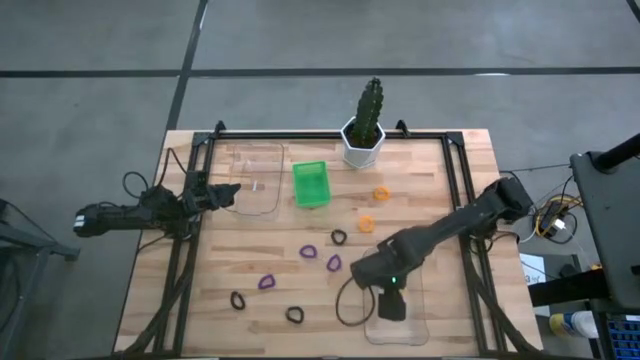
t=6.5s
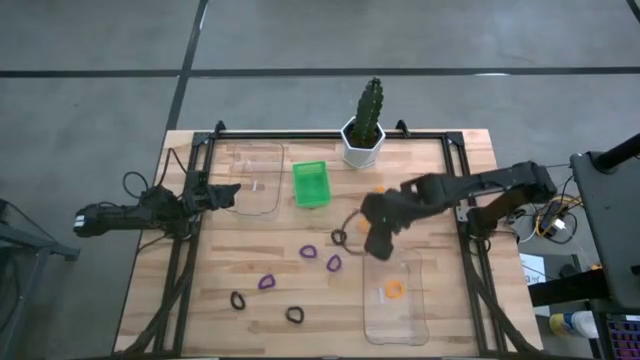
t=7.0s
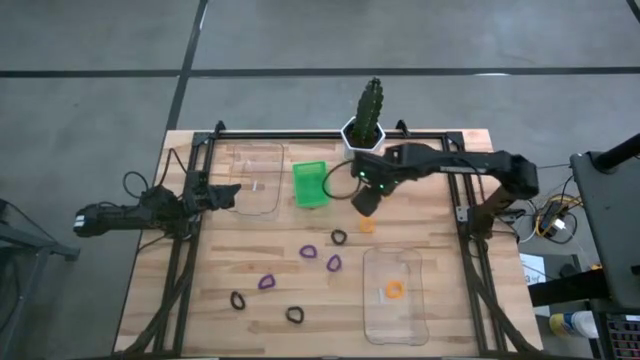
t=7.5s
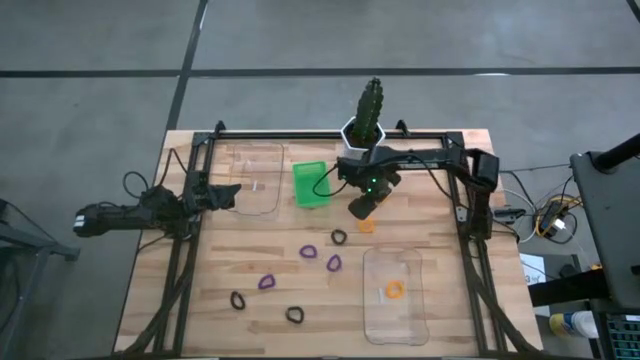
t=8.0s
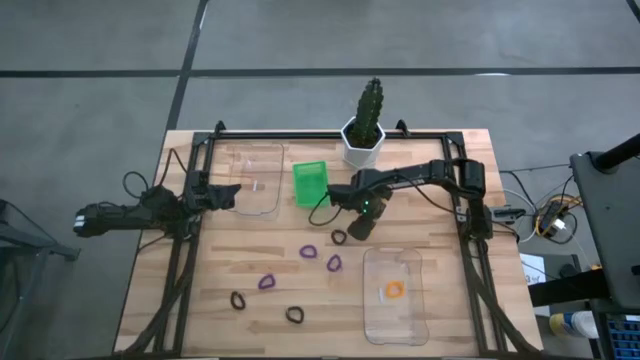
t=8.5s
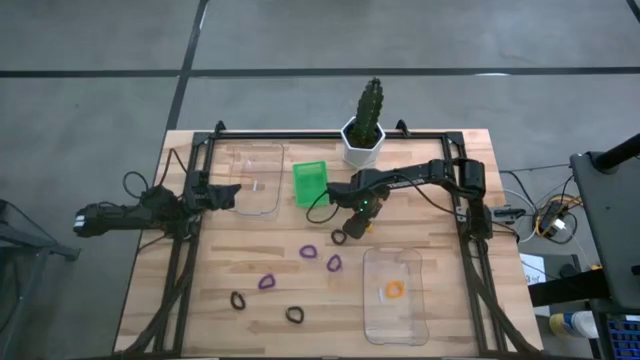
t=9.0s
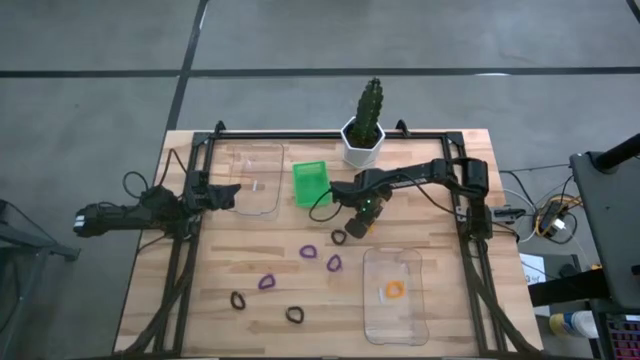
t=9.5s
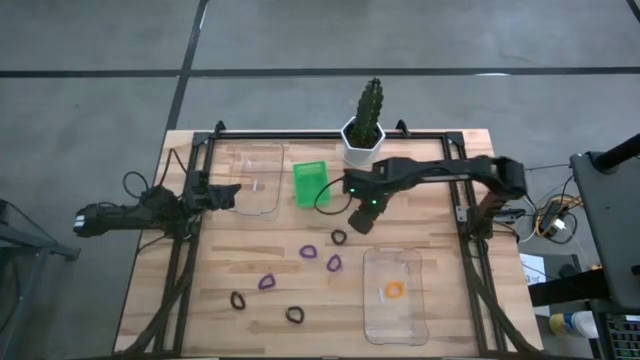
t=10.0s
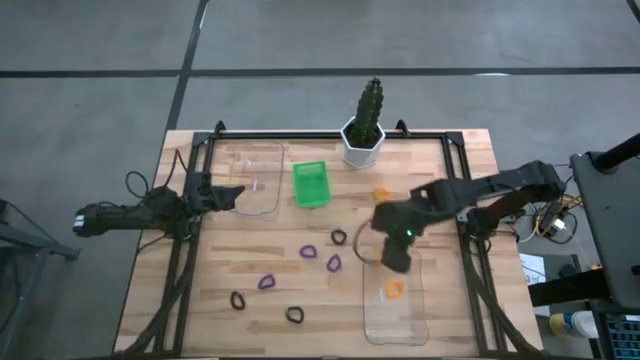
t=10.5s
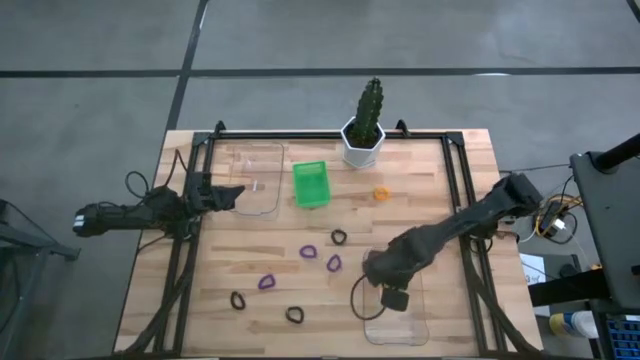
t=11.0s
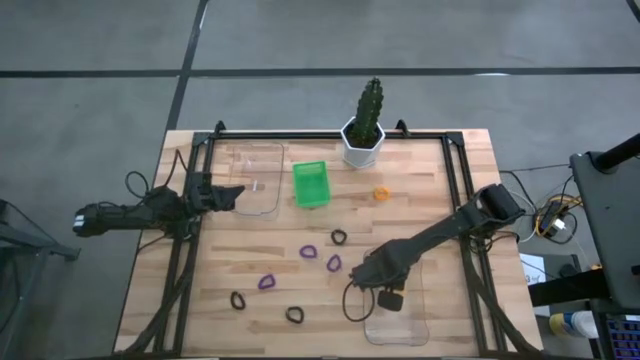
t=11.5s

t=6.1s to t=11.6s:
Task: Sort spring keychains
Put the bottom yellow spring keychain into the bottom transparent bin

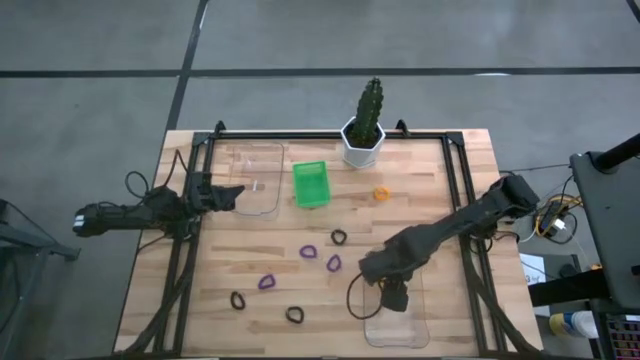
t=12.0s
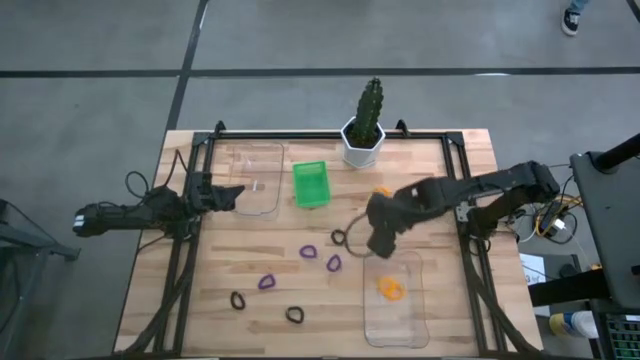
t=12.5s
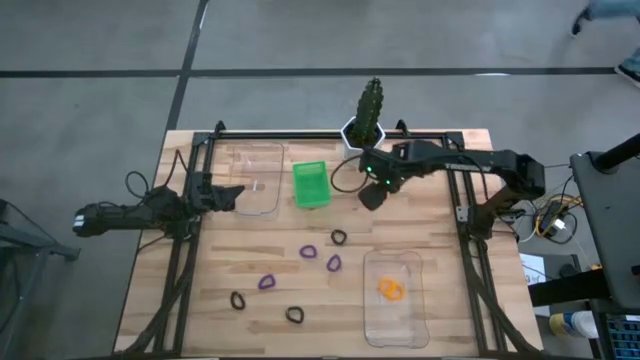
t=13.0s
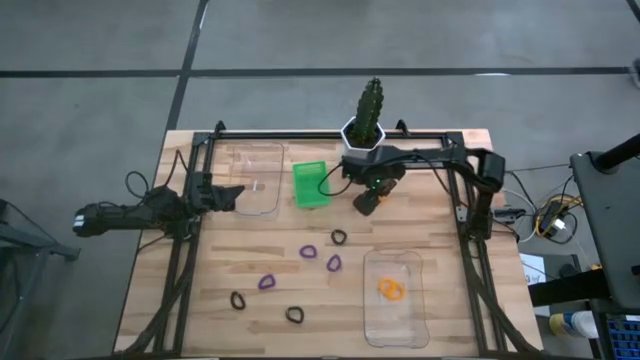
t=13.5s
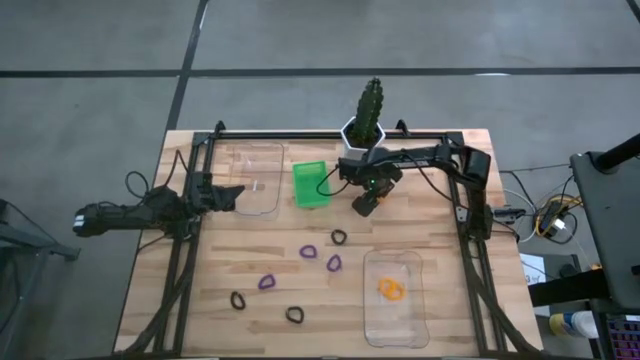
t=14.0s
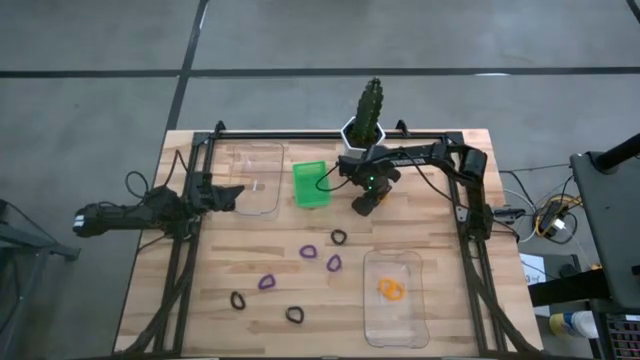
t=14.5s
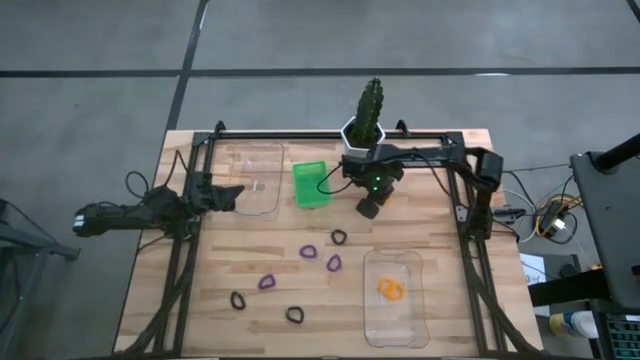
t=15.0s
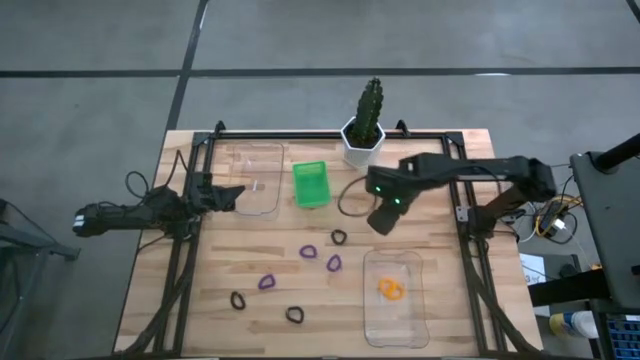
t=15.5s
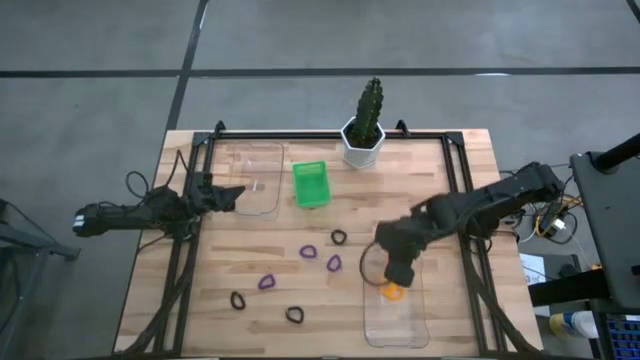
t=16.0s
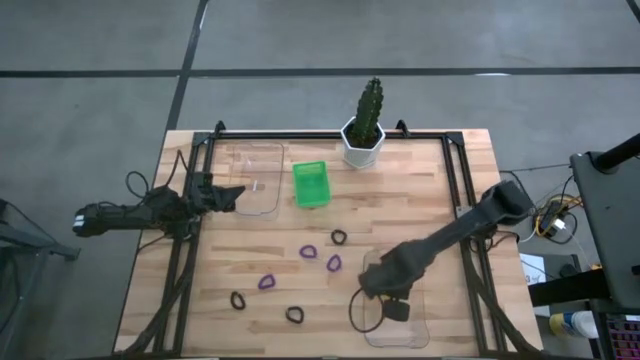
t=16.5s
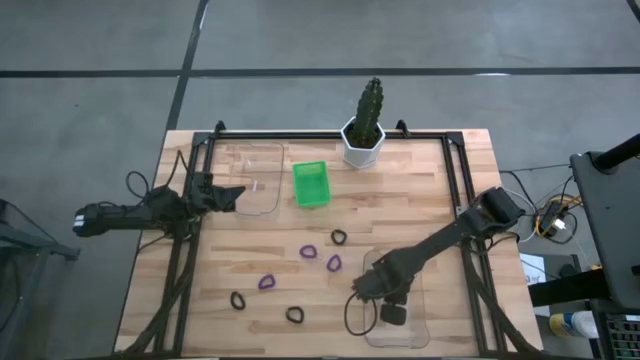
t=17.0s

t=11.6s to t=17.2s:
Put the yellow spring keychain into the bottom transparent bin

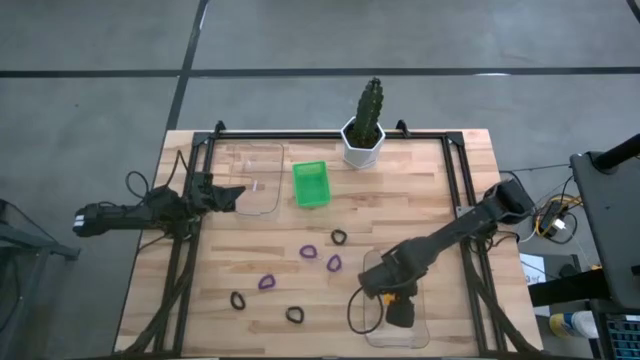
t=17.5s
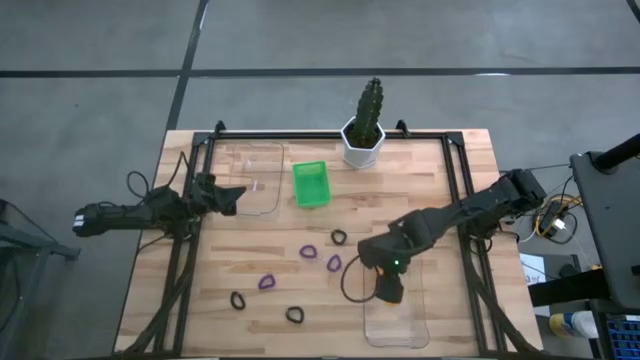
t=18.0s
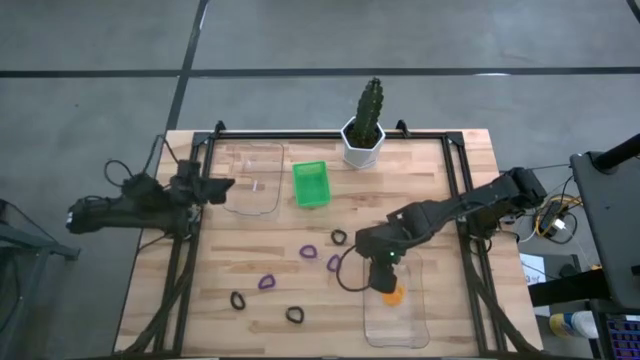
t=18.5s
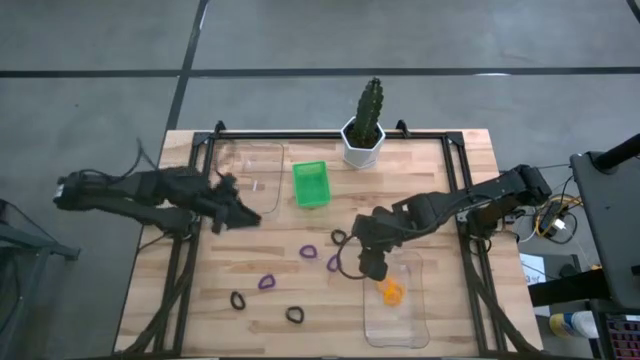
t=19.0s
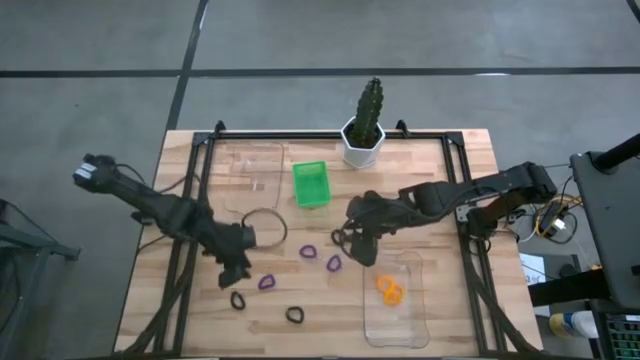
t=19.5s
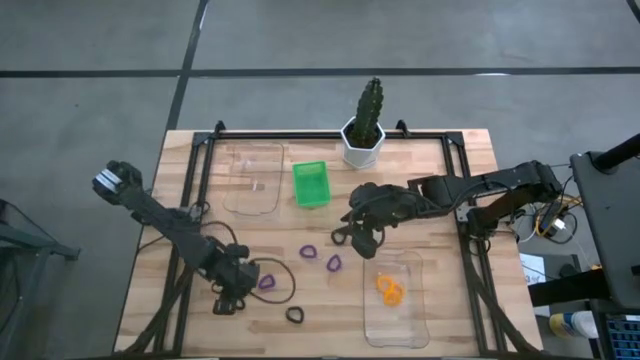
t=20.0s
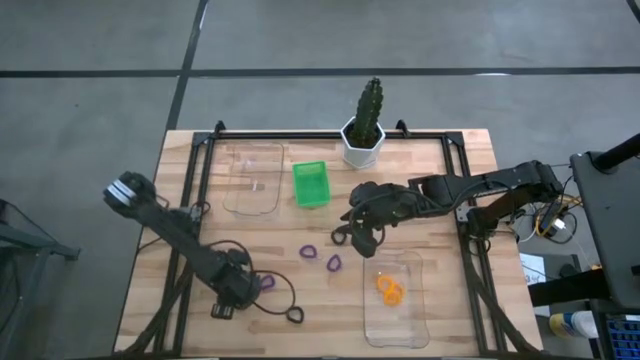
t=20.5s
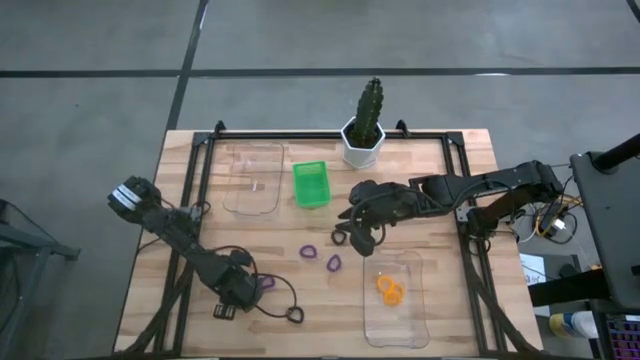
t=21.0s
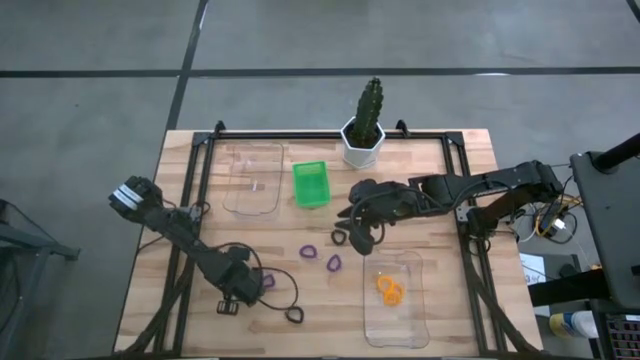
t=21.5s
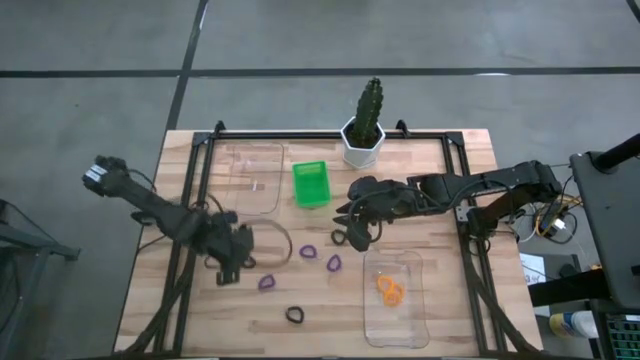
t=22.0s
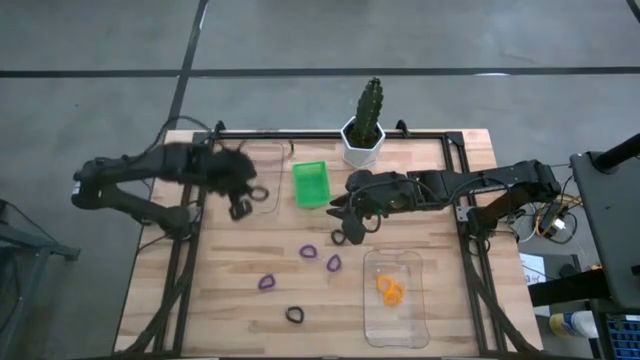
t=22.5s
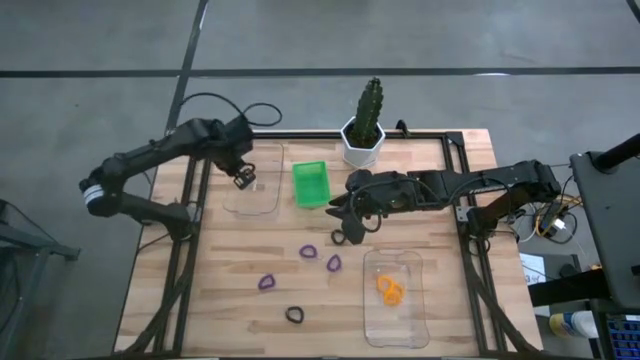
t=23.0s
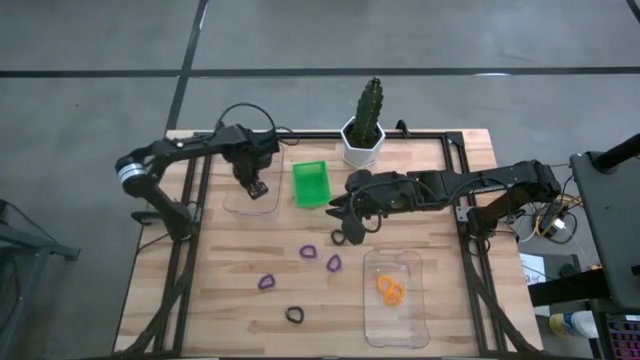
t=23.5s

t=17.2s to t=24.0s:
Put the middle black spring keychain into the top transparent bin

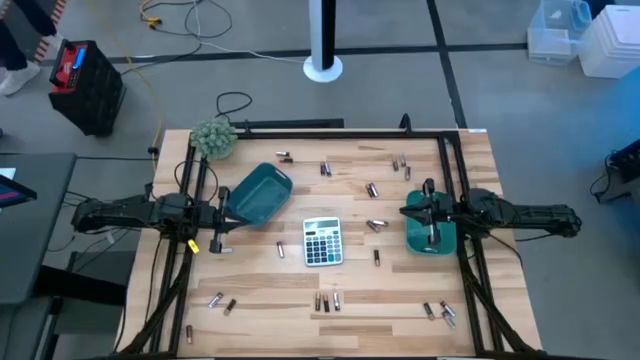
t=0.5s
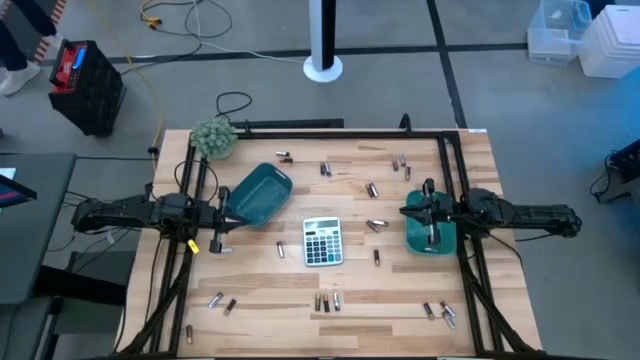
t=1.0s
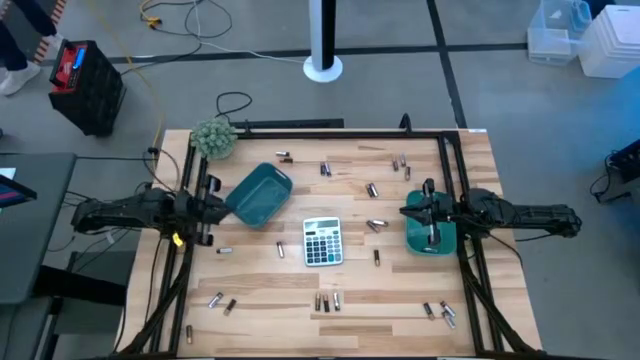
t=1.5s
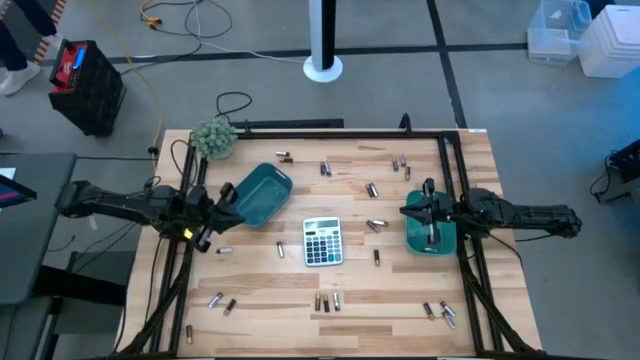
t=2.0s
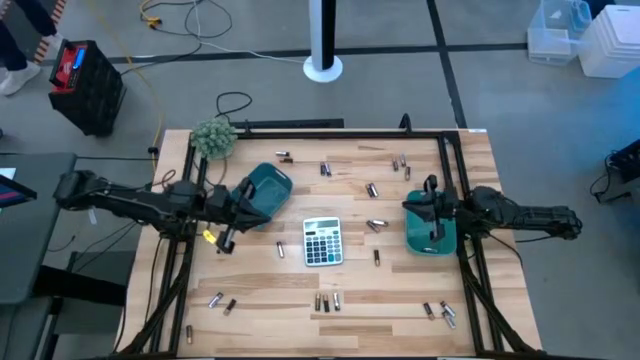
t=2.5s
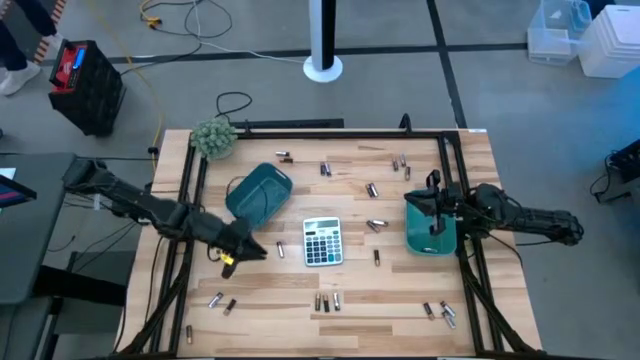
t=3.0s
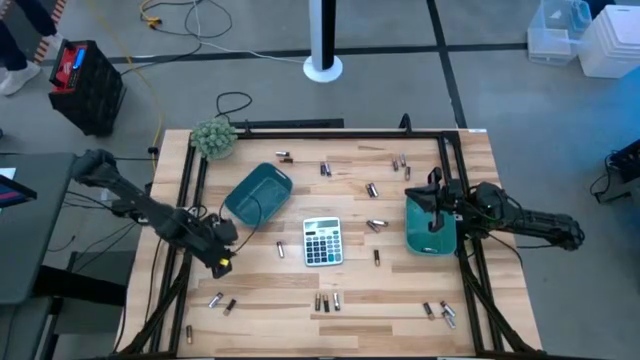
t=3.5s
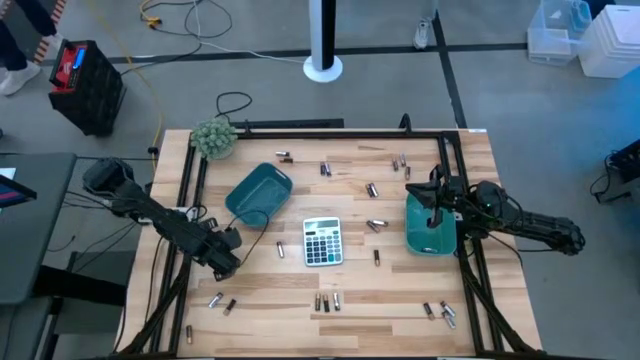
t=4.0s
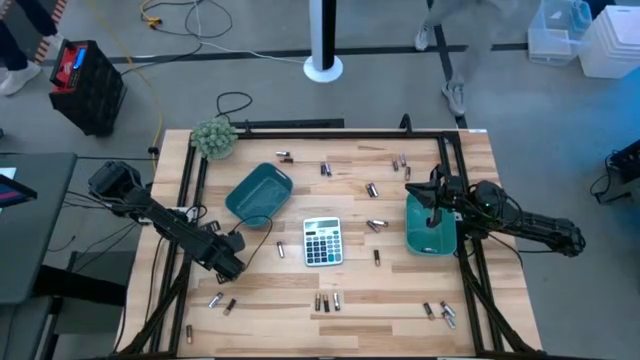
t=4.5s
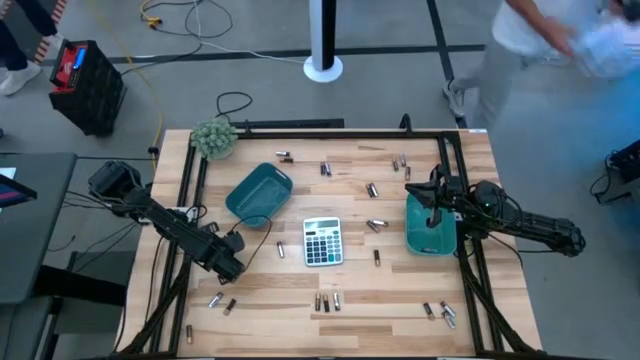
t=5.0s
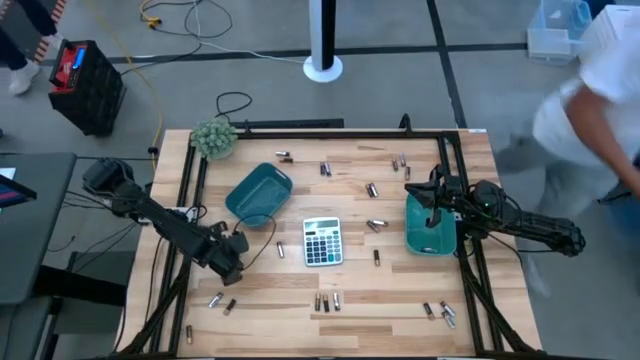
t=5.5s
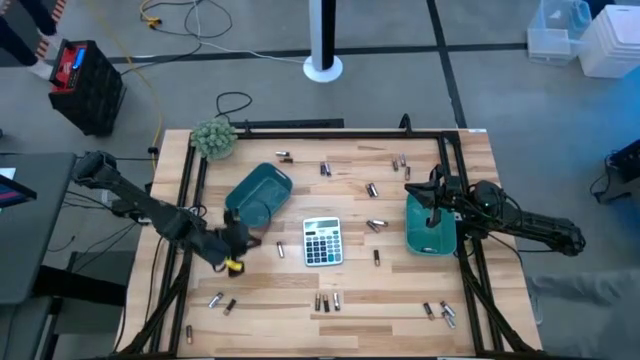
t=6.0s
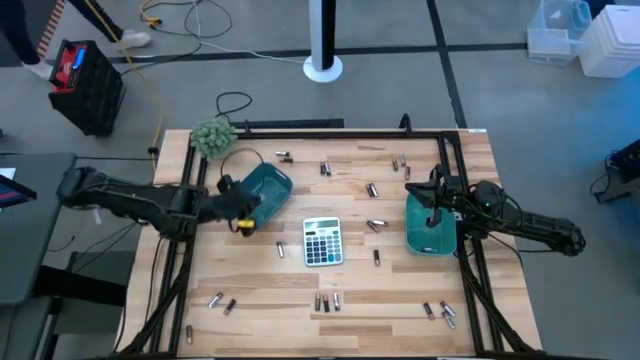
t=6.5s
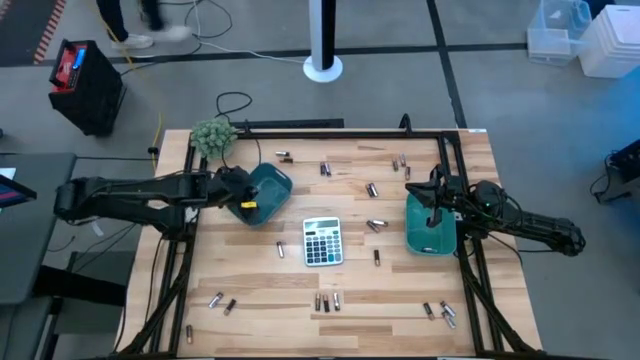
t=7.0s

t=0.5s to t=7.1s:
Task: Sort batteries
Put the silver/black battery into the blue bin
